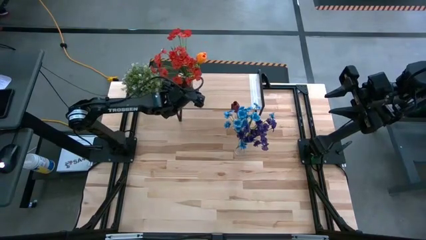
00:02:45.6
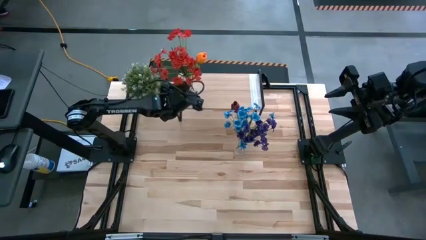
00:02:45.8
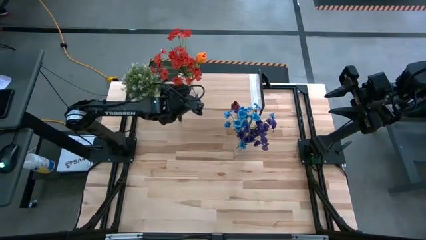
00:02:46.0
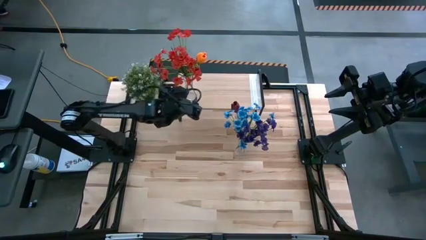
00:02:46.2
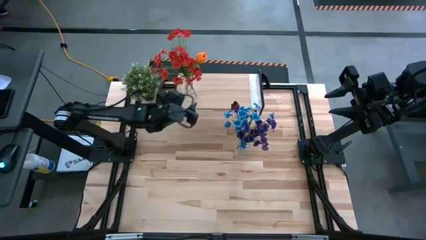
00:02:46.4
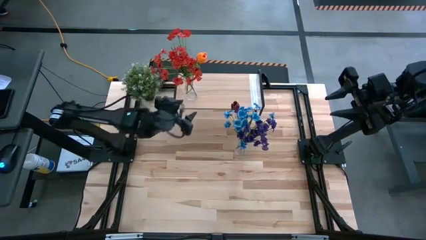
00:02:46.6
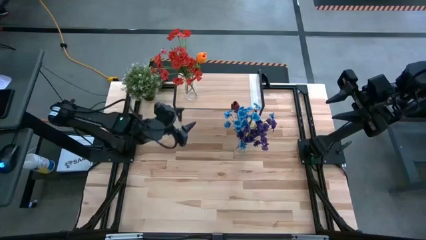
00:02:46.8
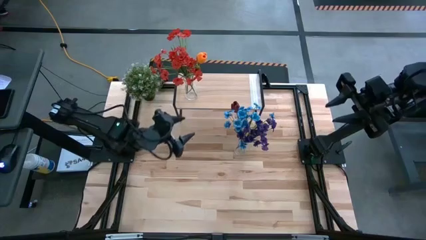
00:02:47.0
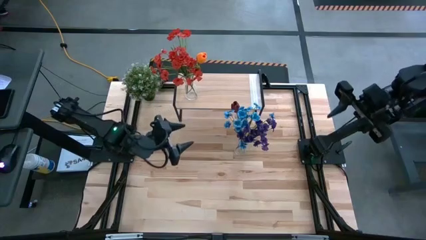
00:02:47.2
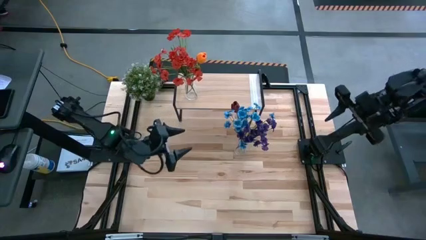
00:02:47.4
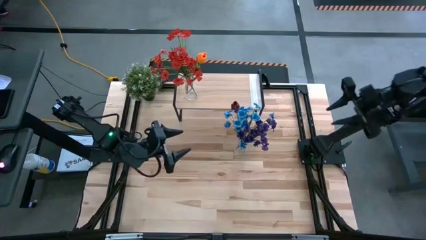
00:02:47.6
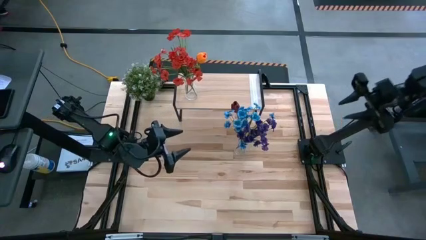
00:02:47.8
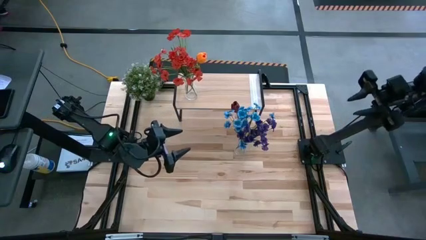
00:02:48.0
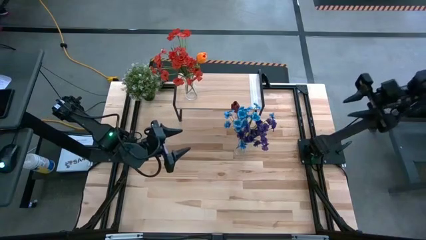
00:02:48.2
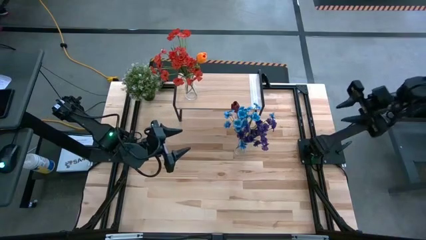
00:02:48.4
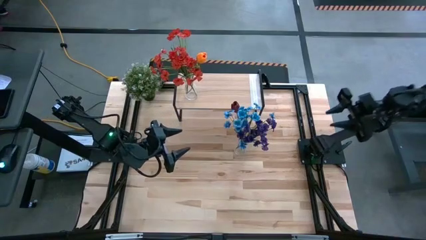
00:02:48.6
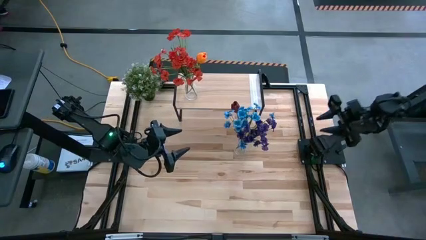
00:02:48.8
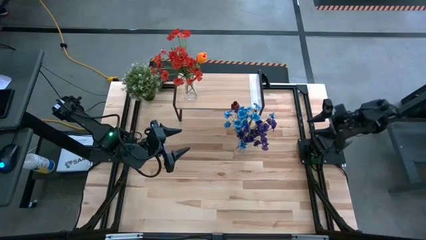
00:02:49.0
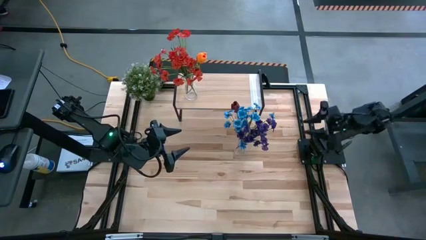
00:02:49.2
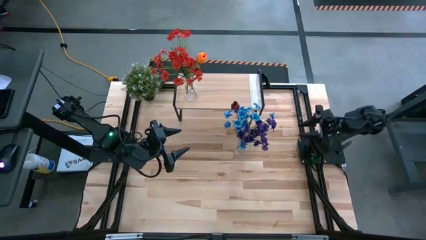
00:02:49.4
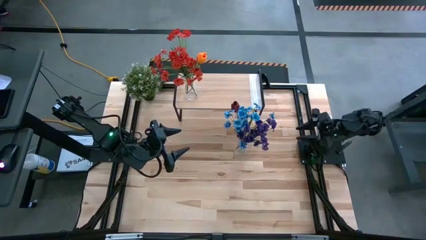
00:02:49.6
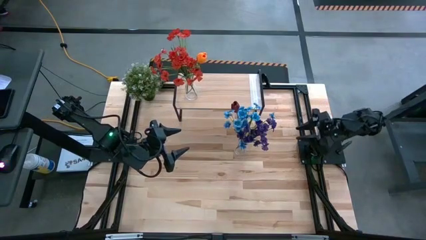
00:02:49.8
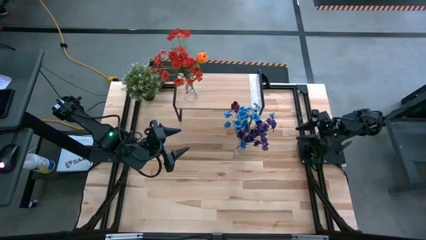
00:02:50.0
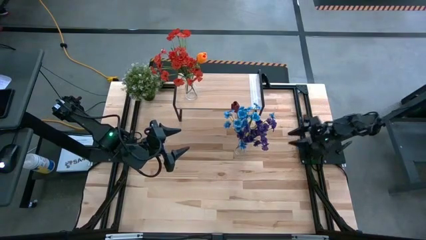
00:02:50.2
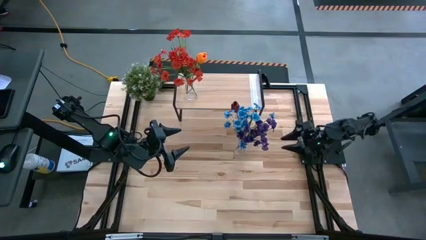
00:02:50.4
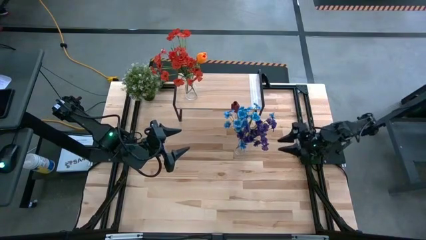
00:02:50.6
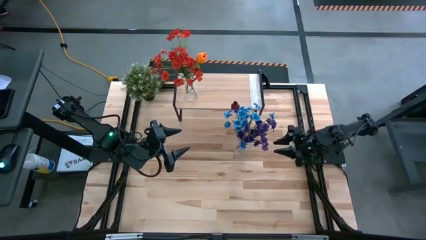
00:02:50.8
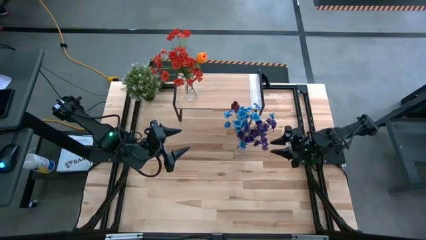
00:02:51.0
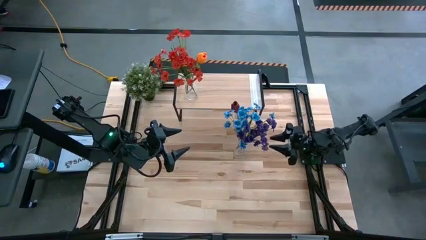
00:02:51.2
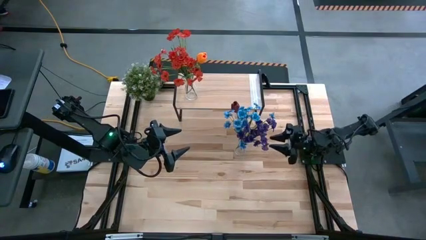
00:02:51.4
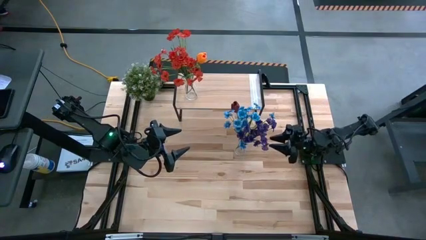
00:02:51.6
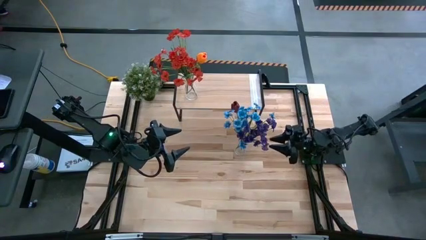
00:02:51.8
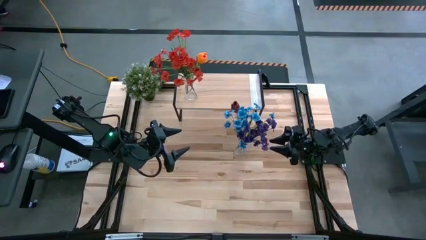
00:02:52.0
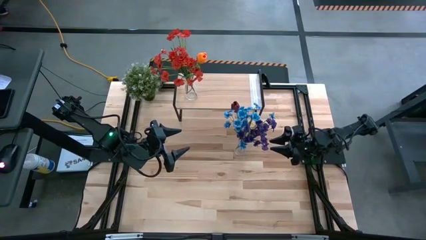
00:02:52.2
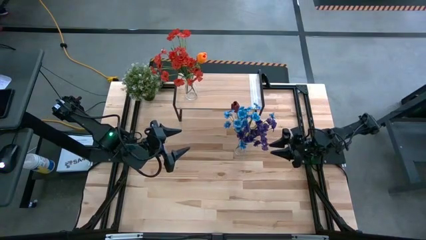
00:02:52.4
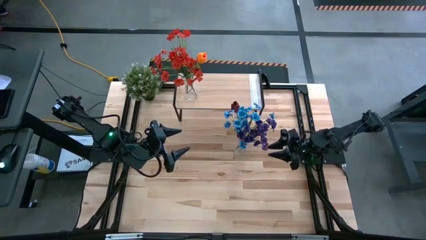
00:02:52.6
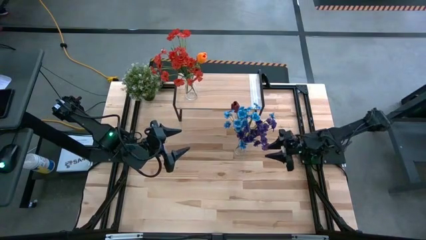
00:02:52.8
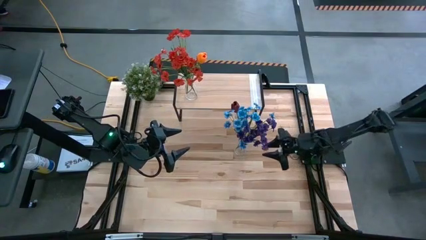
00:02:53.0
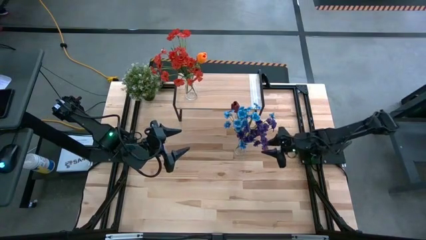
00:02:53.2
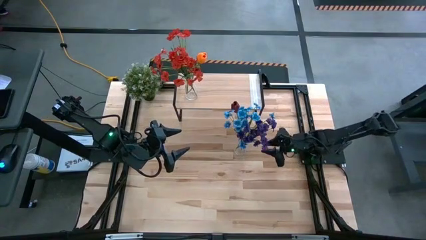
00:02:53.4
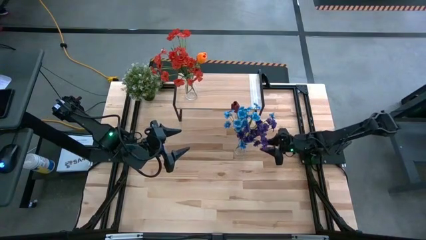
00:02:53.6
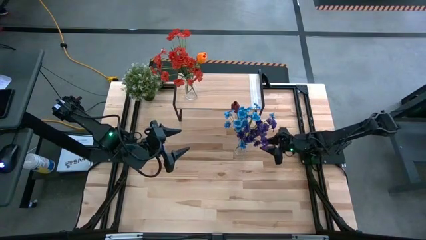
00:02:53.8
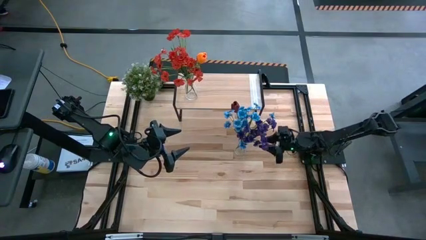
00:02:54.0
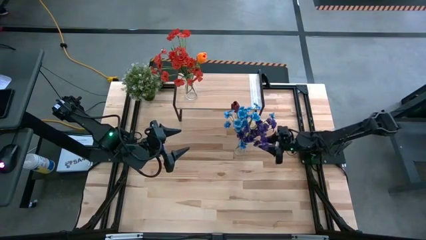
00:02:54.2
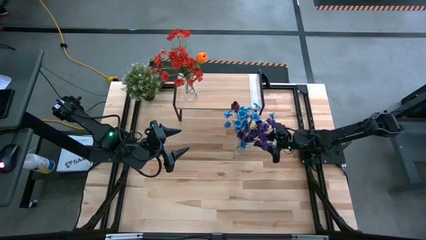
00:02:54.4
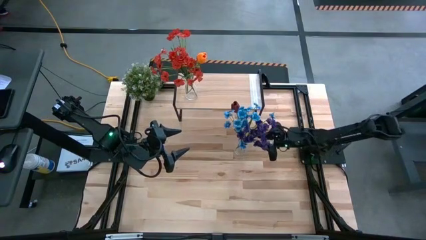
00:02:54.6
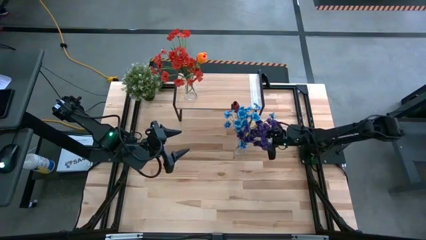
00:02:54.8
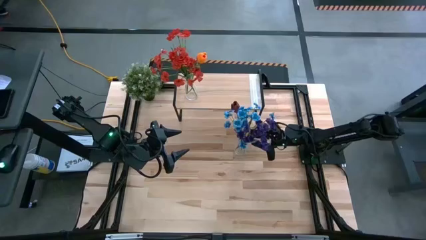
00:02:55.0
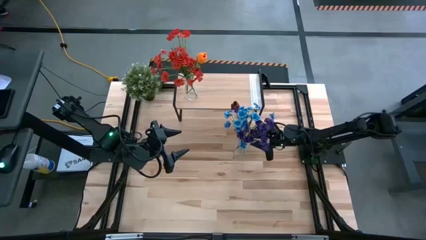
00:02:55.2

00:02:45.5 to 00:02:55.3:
Task: Pick and place flowers into a vace then onto a shelf
Put the transparent vase on the shelf

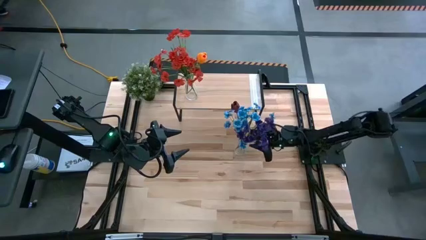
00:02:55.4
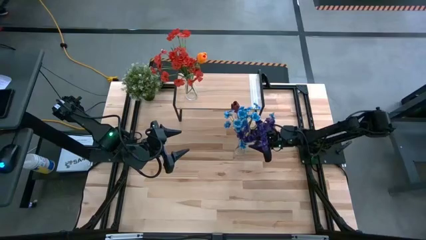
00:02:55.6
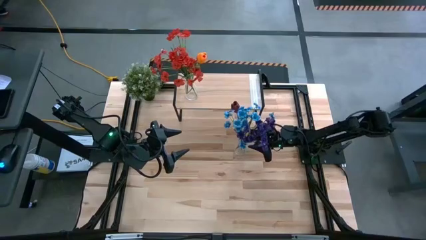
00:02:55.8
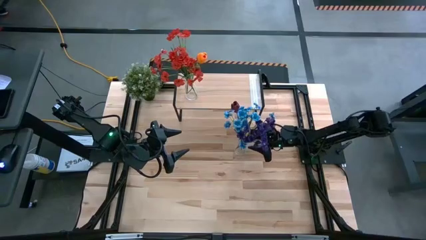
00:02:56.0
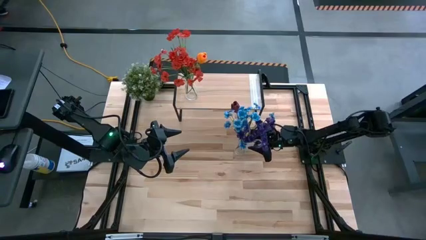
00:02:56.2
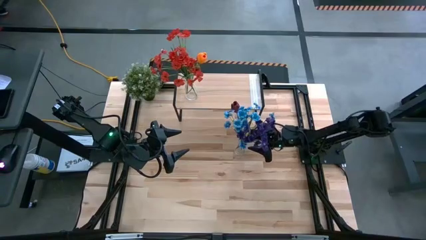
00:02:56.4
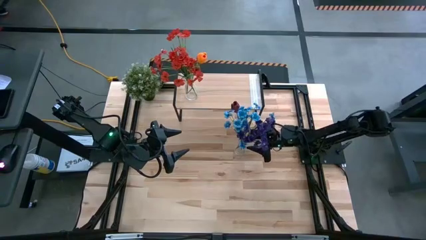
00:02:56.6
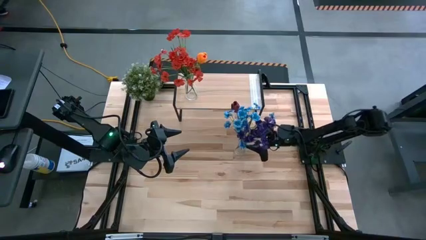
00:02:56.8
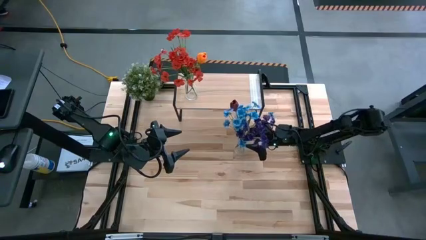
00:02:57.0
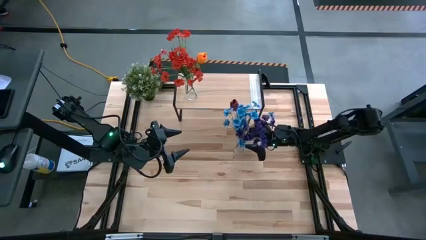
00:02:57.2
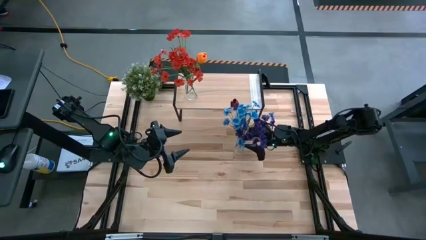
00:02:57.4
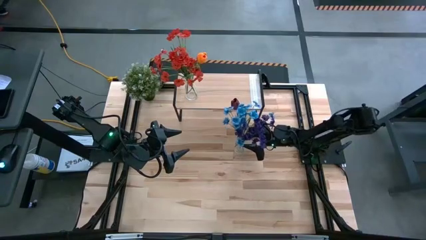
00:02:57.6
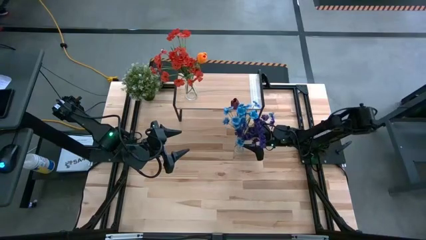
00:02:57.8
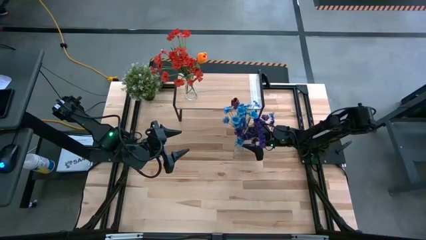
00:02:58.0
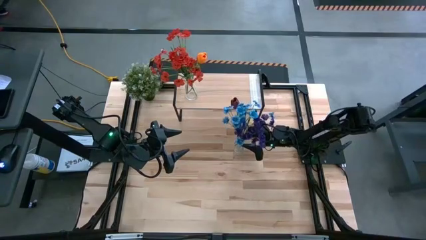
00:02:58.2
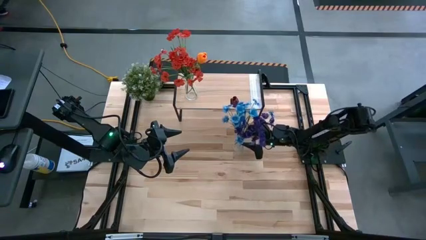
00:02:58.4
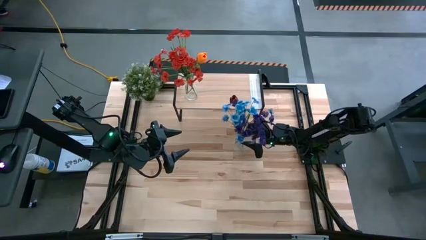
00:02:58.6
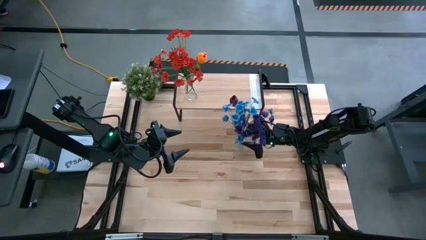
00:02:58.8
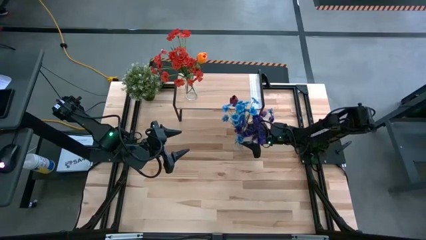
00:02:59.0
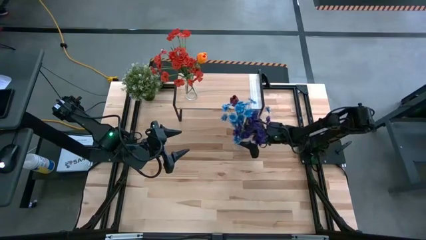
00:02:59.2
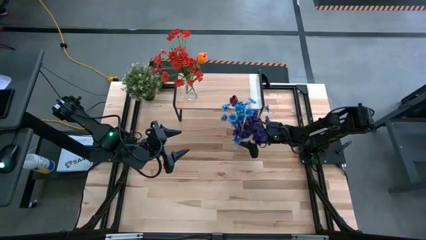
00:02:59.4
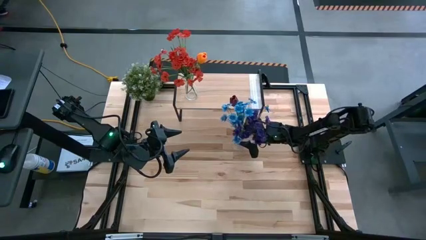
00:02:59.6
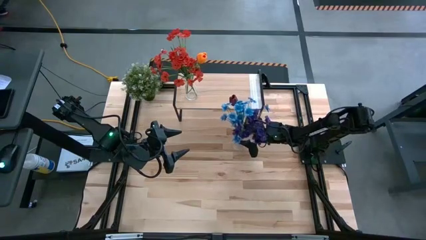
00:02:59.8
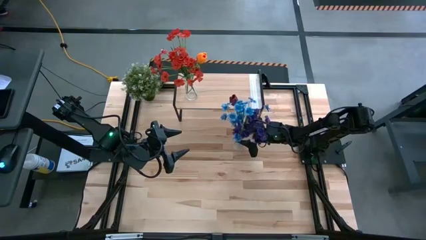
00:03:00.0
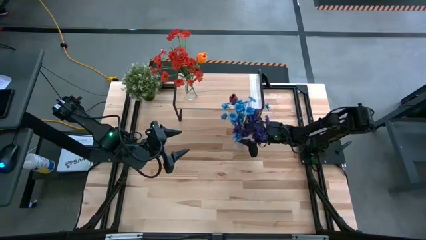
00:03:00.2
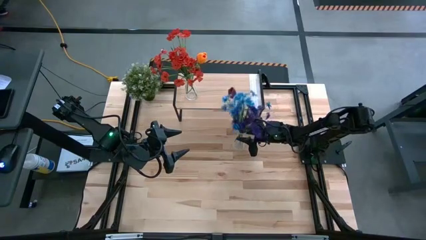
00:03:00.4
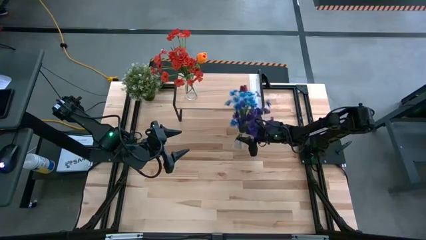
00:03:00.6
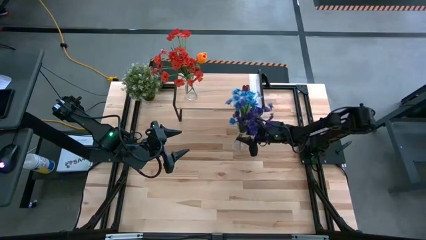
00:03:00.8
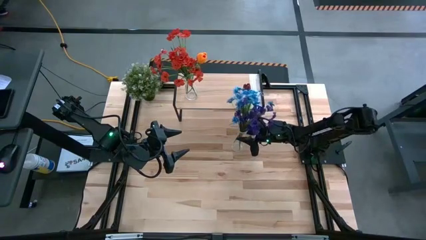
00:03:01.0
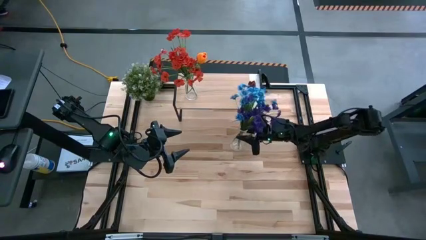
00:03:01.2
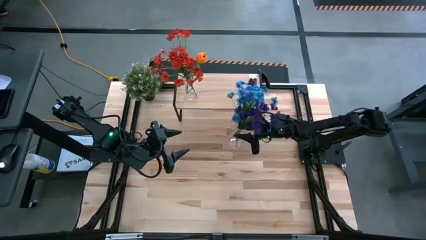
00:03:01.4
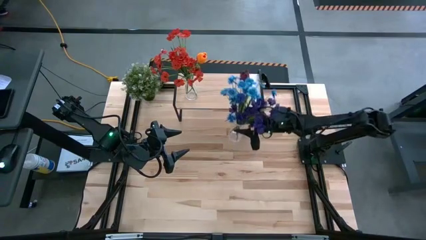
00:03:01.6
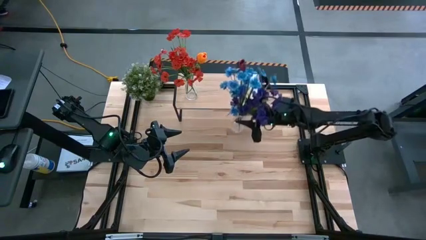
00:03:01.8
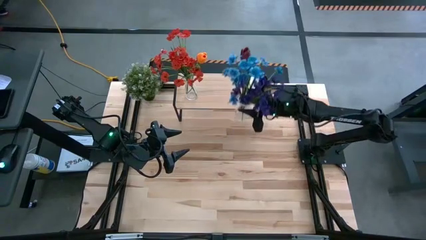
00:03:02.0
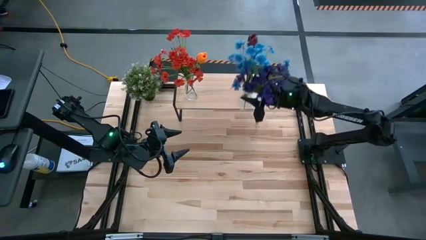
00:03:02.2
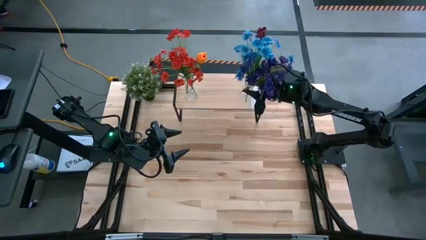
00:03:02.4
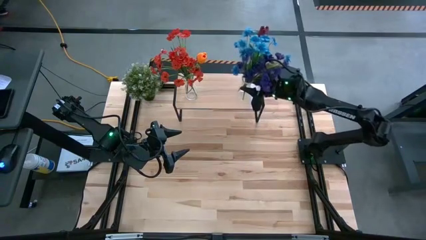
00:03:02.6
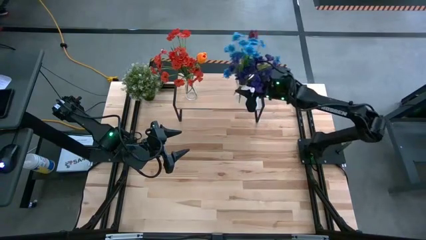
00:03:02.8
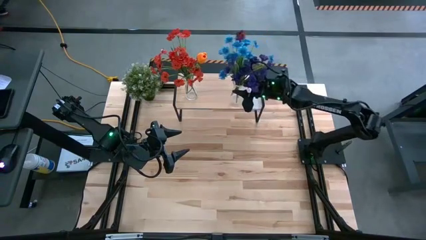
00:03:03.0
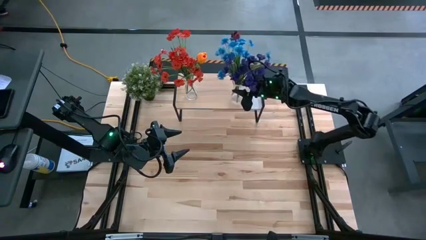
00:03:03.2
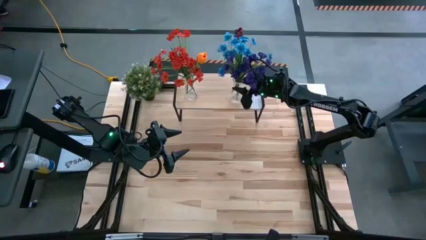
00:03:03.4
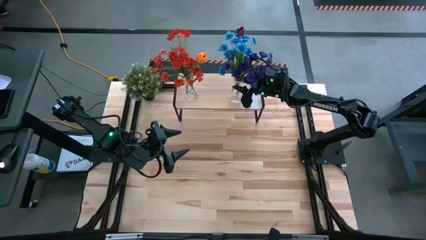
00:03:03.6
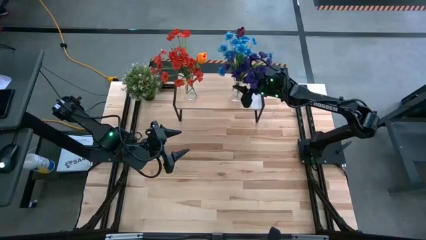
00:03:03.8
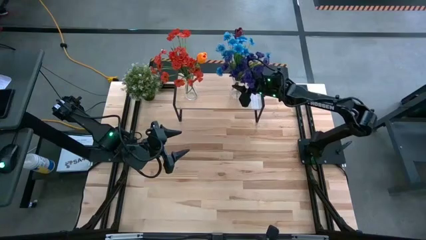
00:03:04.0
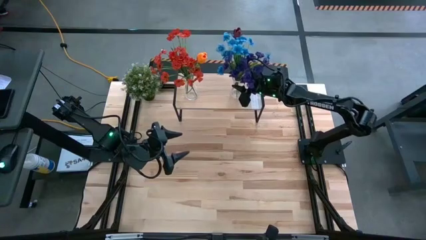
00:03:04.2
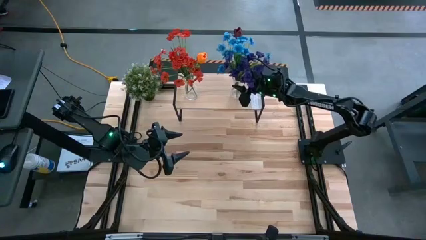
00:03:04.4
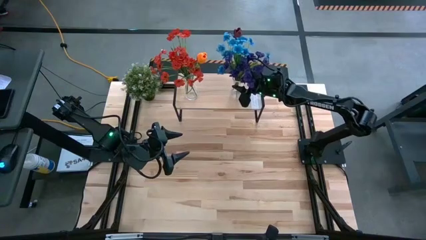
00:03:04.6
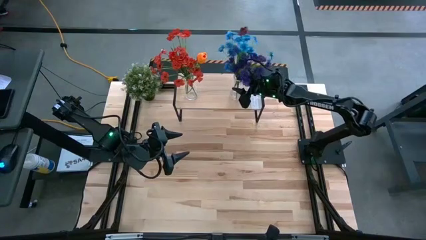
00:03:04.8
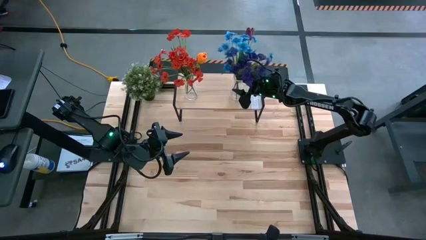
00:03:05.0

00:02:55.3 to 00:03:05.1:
Put the transparent vase on the shelf
